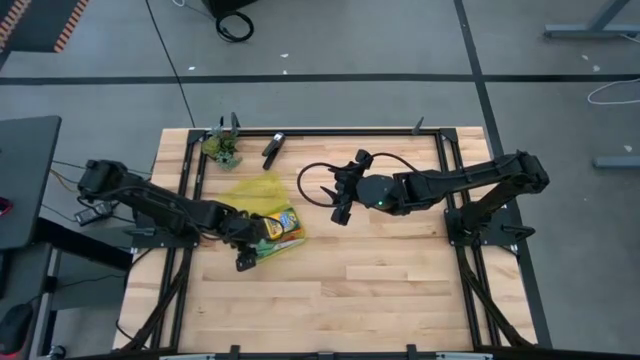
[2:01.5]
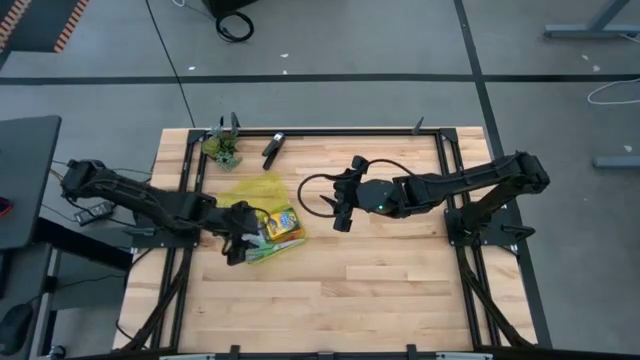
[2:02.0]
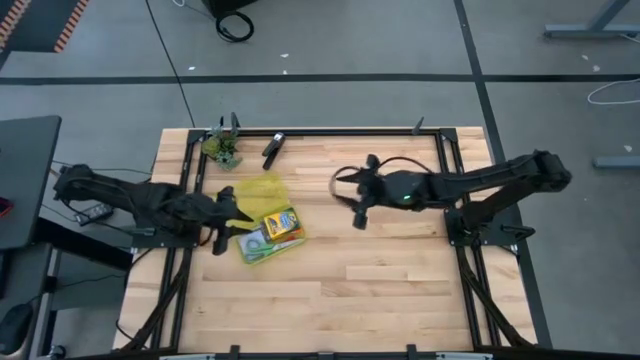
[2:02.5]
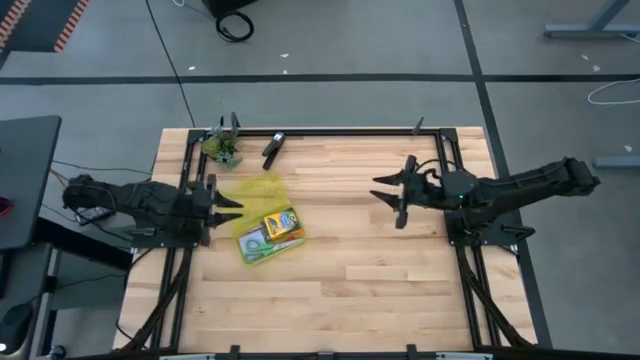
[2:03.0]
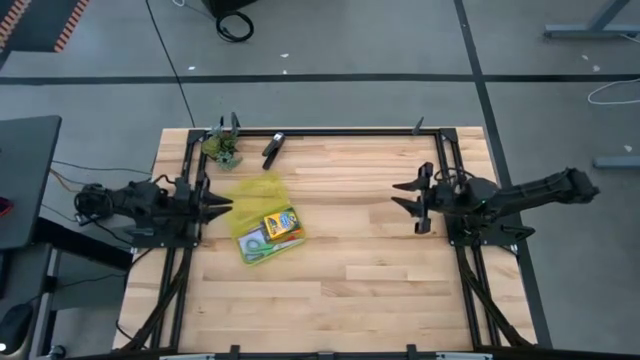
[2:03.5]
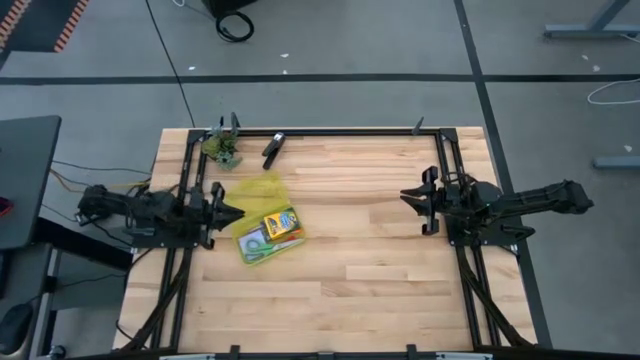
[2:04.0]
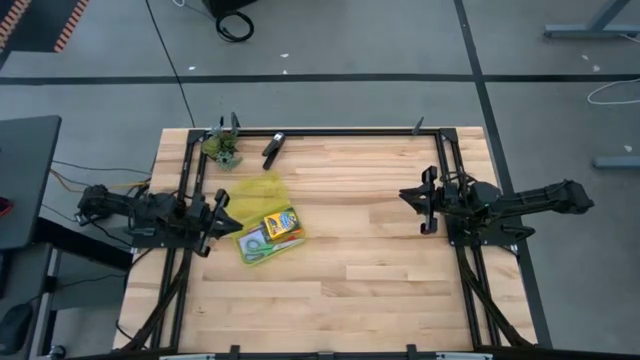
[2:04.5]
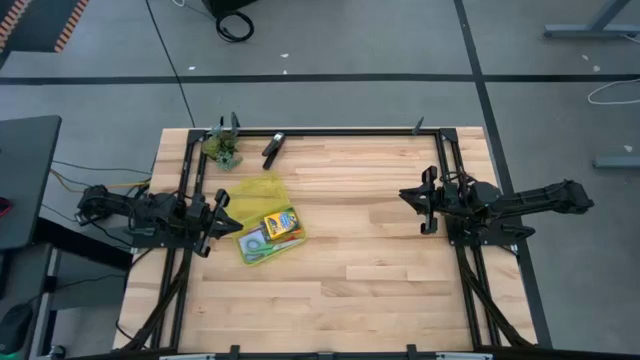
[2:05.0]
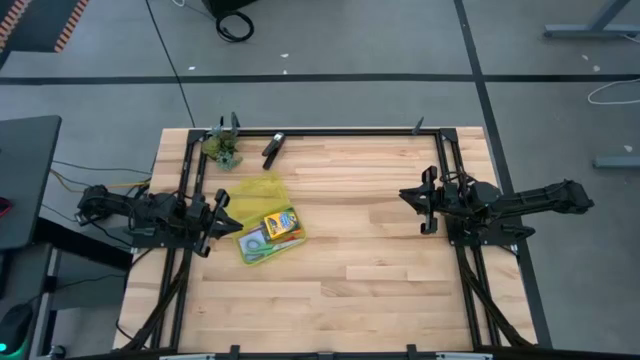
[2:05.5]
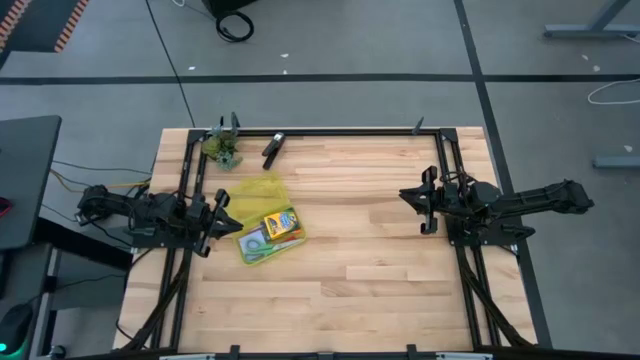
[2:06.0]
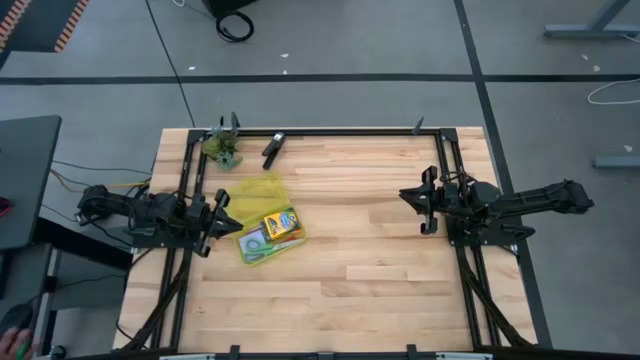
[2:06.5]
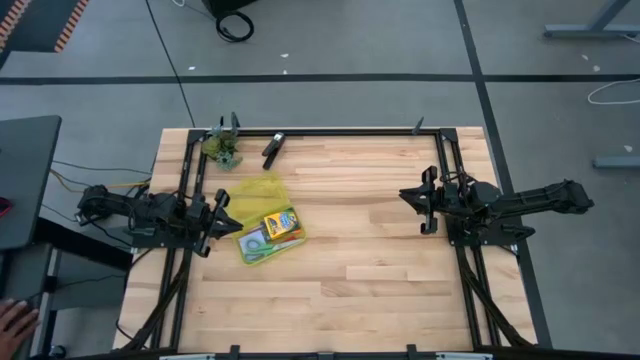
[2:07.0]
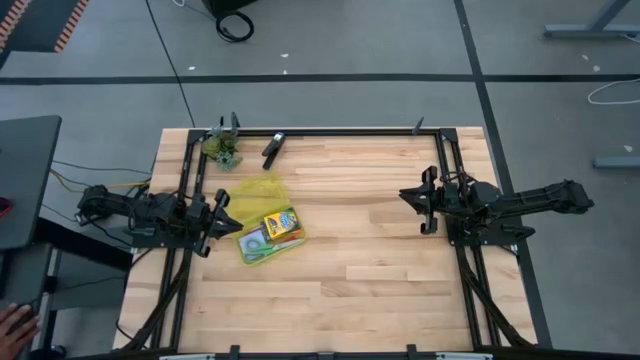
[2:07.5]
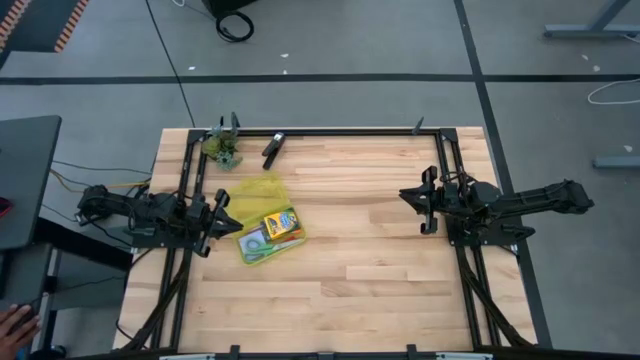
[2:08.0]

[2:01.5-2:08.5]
Task: Pack school essentials
Return to Home Position

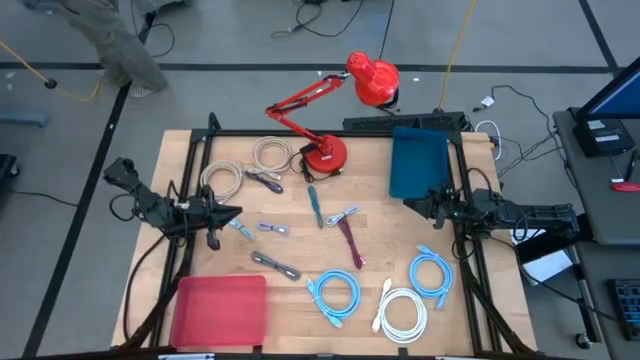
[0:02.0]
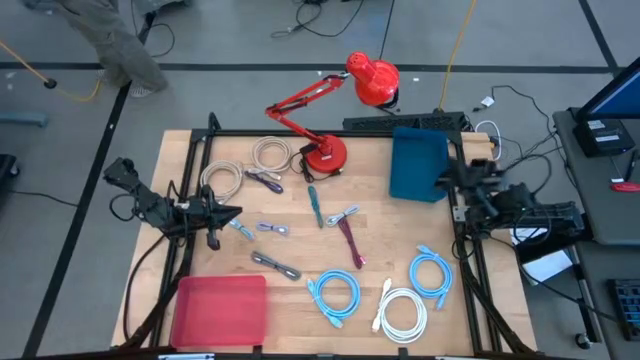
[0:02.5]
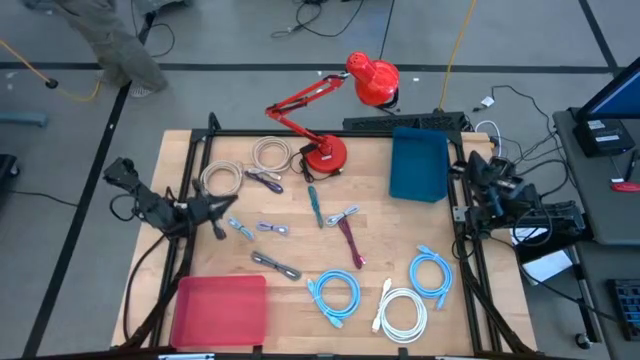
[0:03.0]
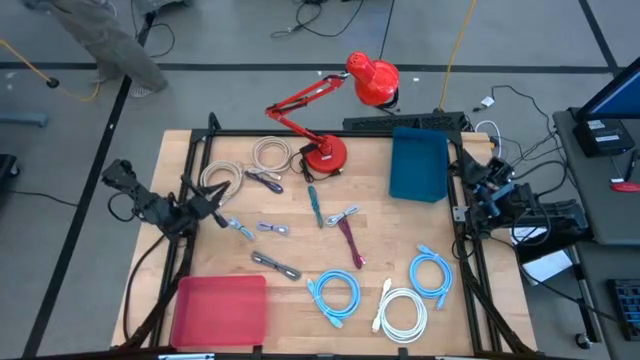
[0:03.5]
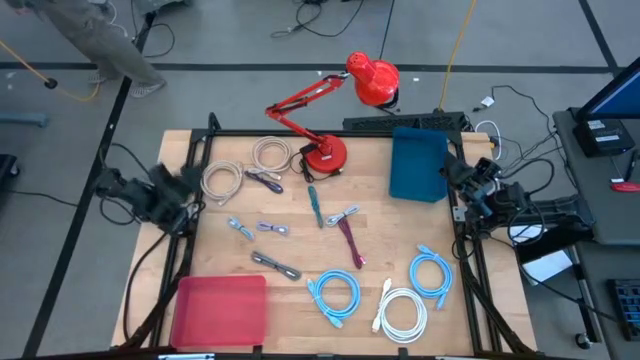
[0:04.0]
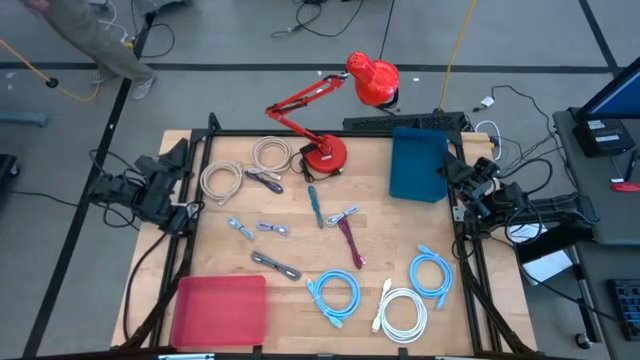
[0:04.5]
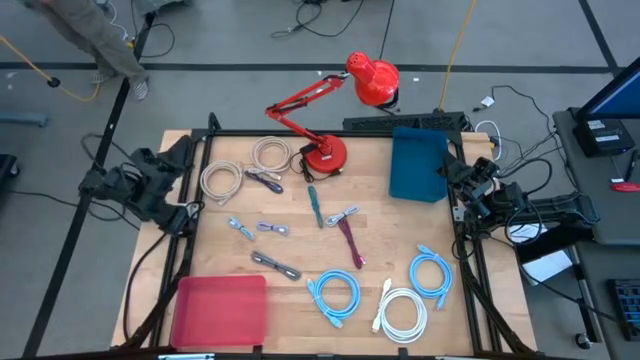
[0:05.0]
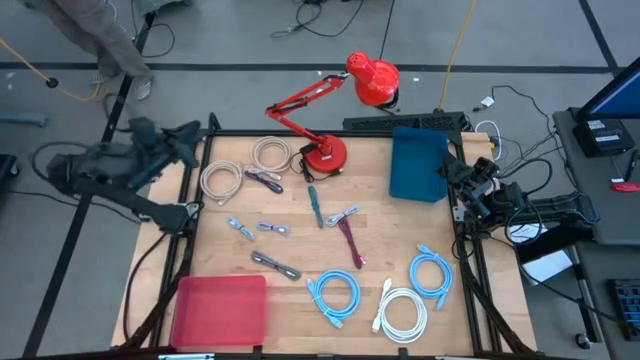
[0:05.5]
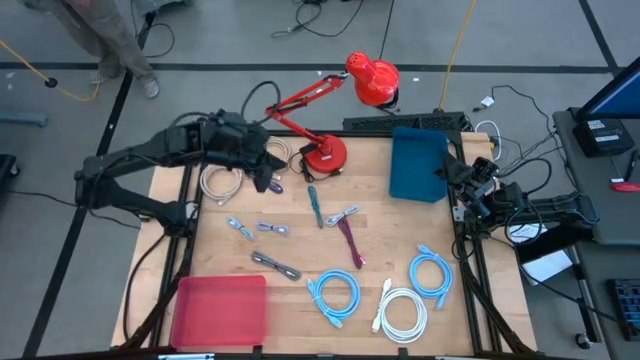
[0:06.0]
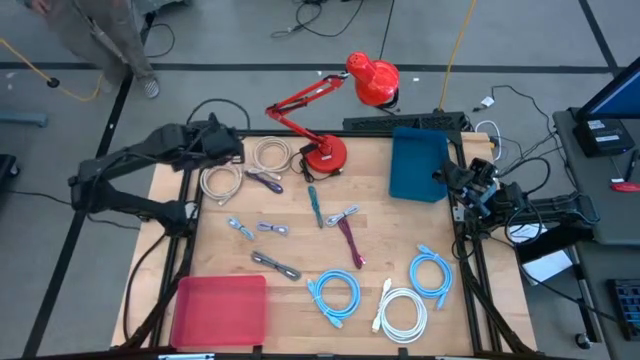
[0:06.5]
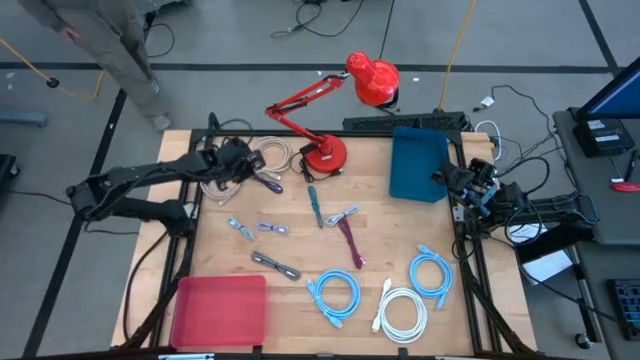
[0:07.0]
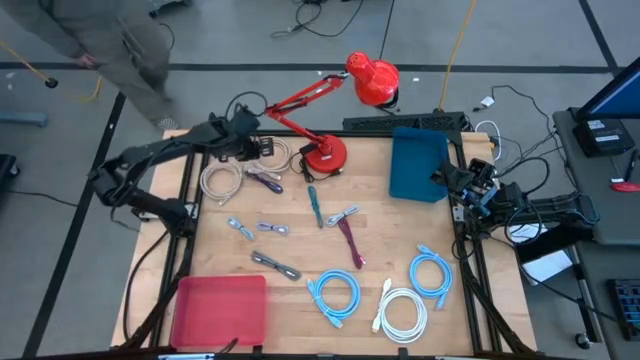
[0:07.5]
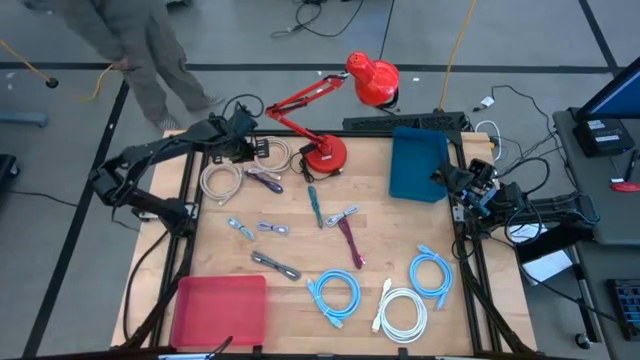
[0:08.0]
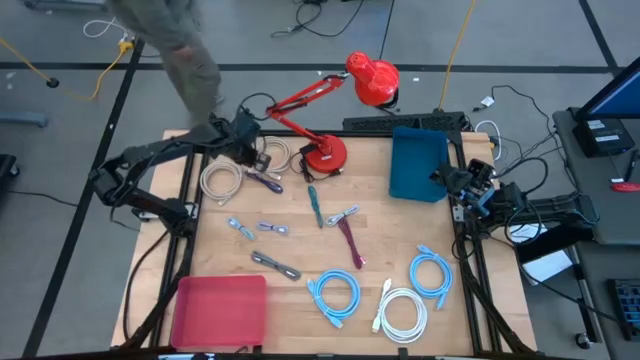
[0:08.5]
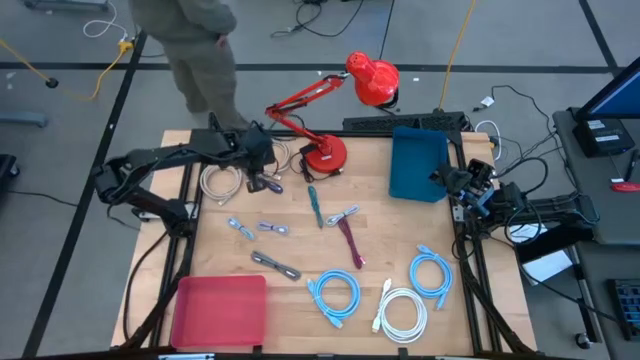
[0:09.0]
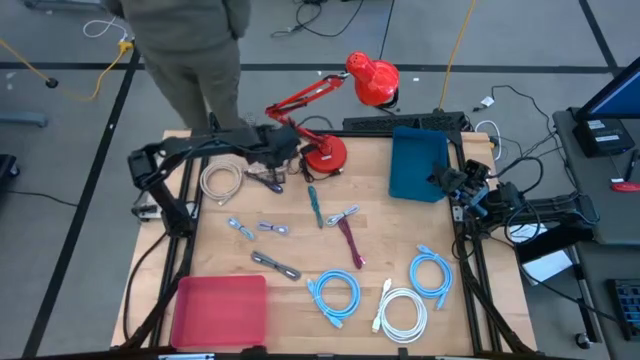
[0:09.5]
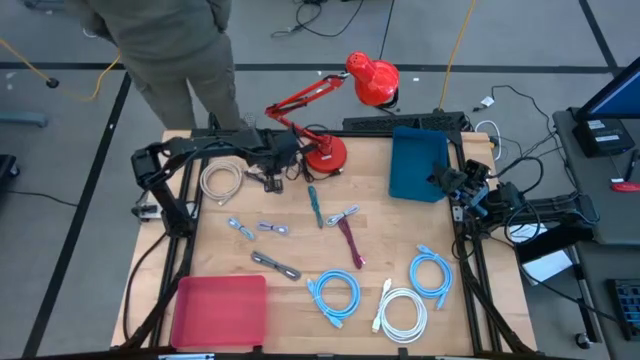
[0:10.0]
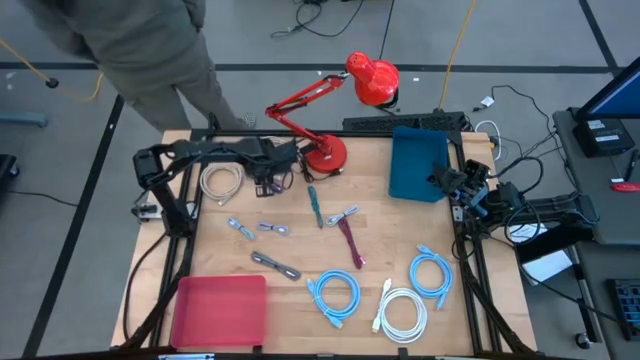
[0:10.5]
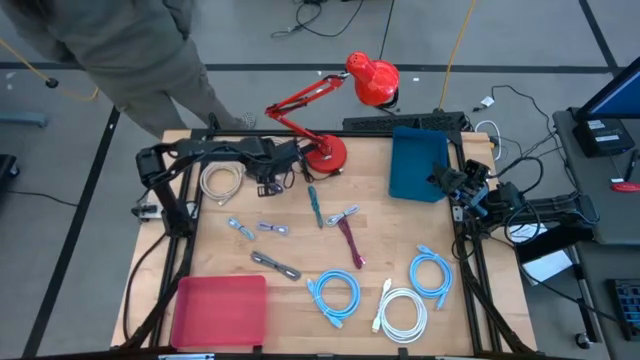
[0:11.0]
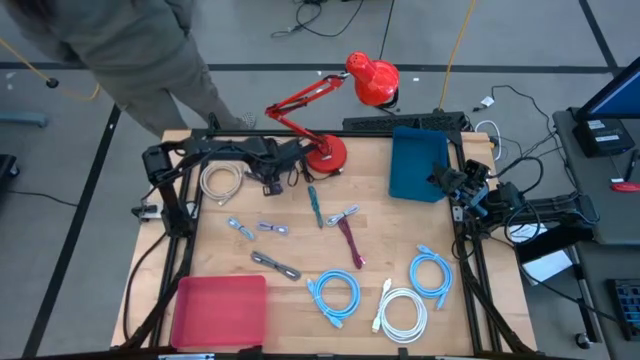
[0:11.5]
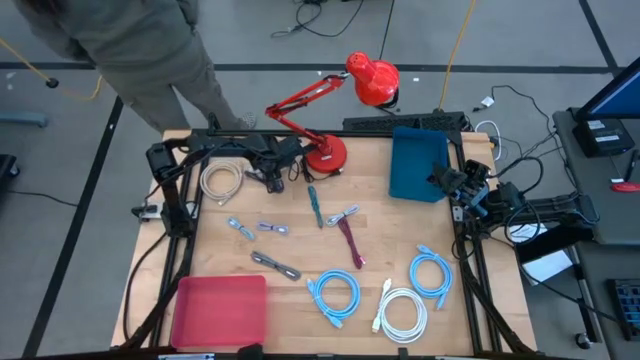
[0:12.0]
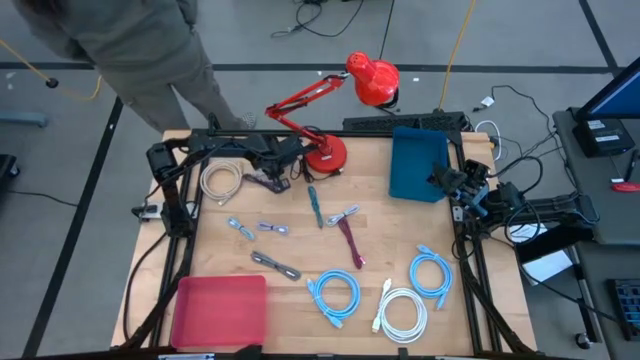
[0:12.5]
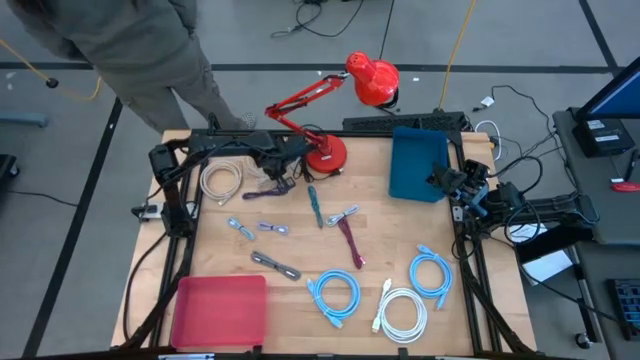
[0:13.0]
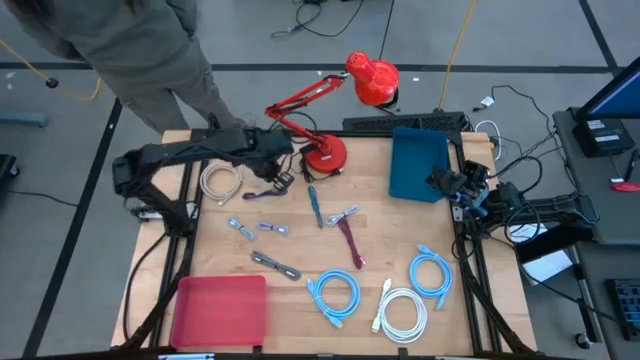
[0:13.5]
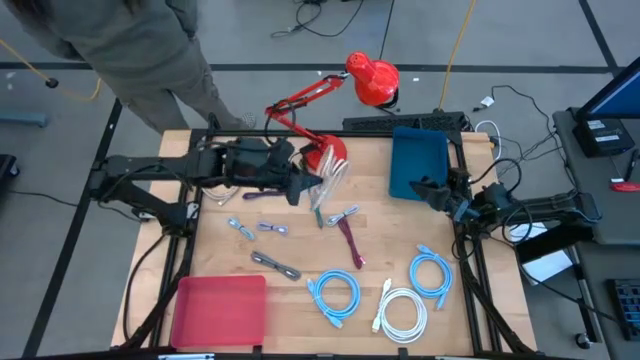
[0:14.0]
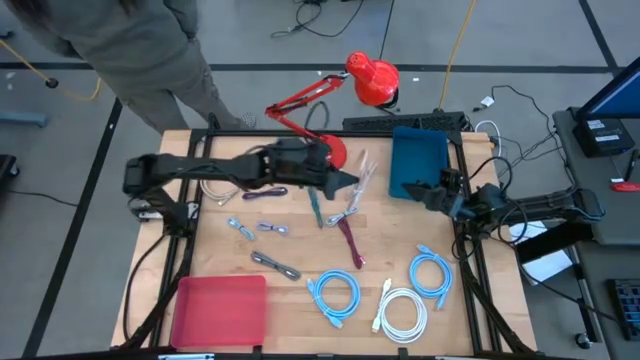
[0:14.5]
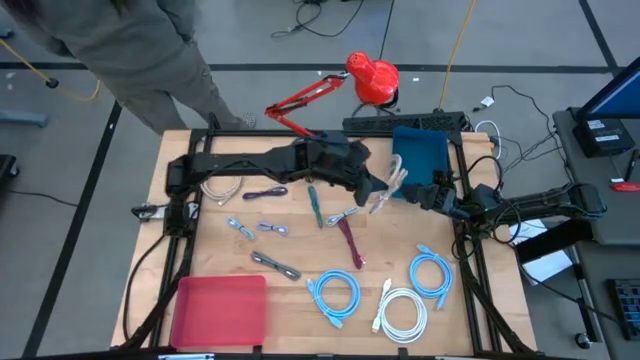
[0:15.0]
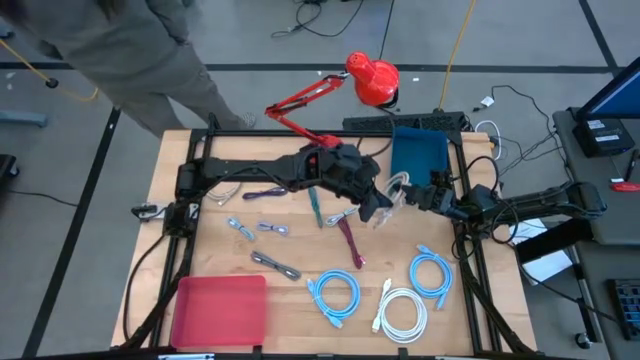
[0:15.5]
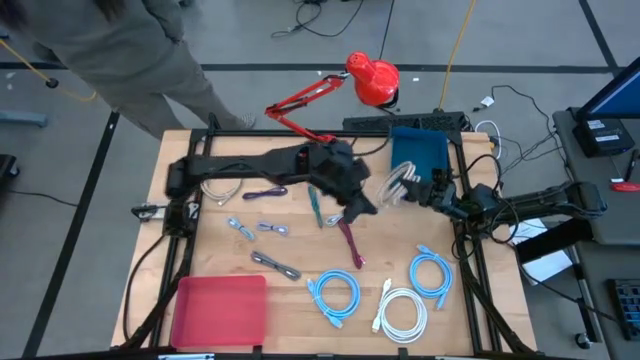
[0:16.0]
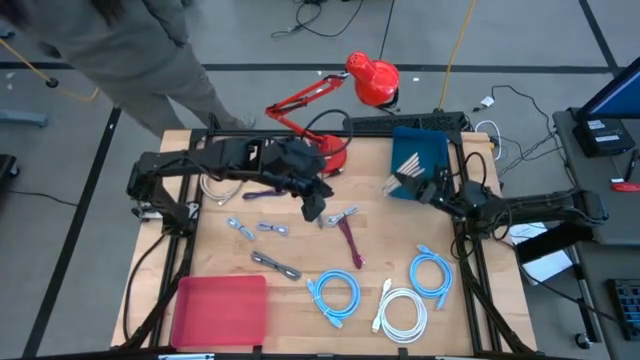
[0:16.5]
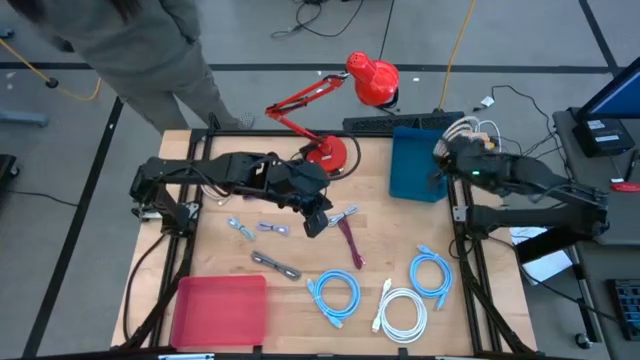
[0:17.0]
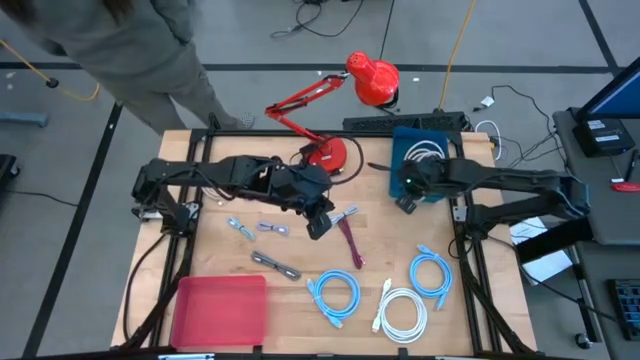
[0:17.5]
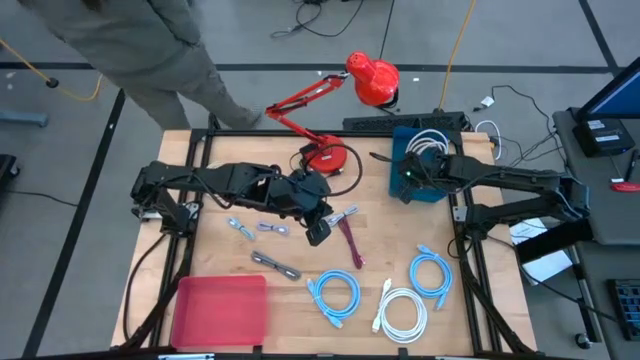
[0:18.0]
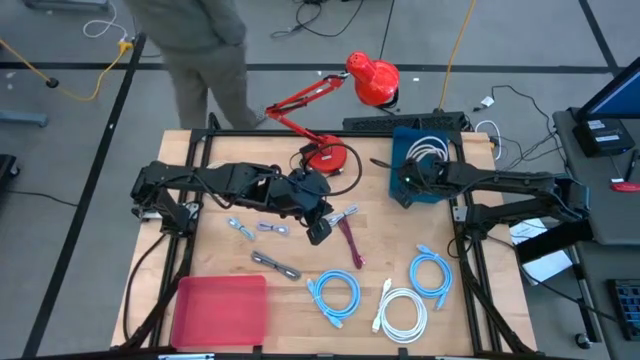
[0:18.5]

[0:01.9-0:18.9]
Task: Sort cables
Put the top gray usb cable into the blue bin
